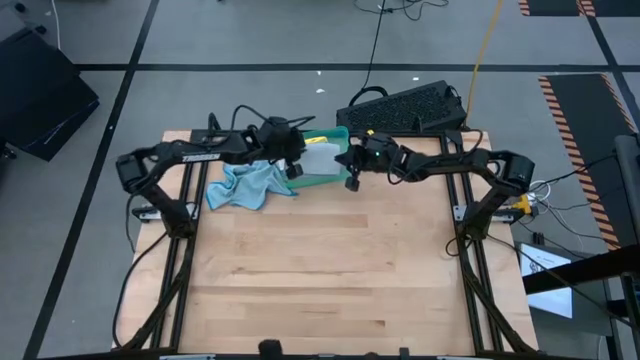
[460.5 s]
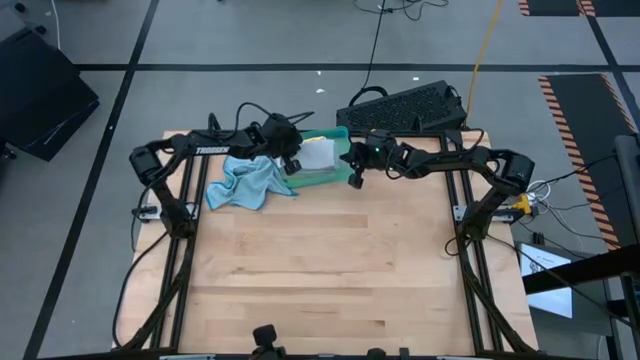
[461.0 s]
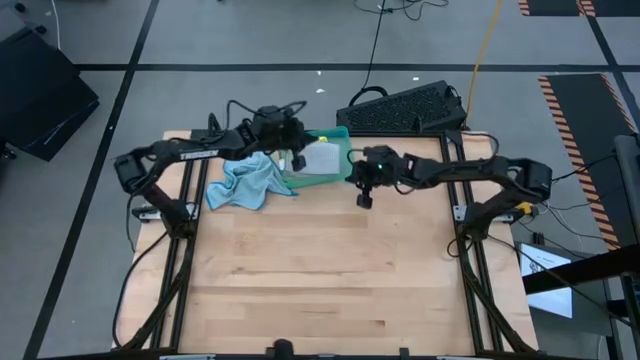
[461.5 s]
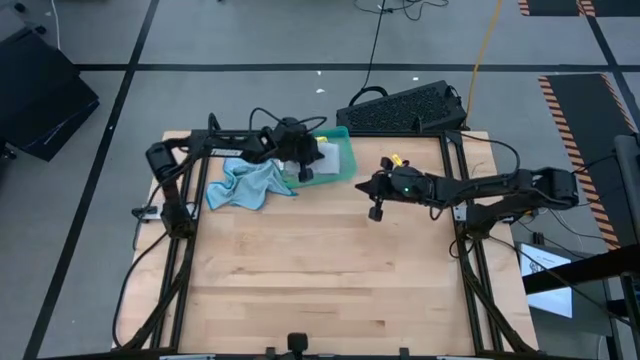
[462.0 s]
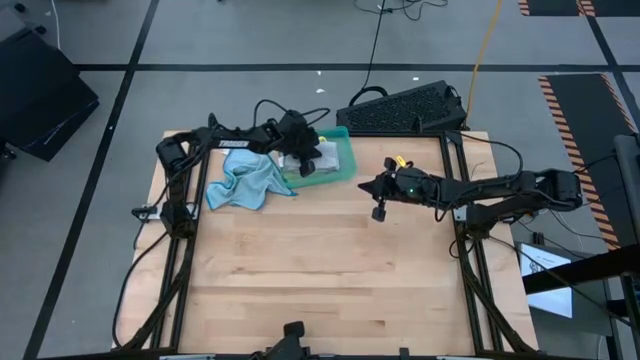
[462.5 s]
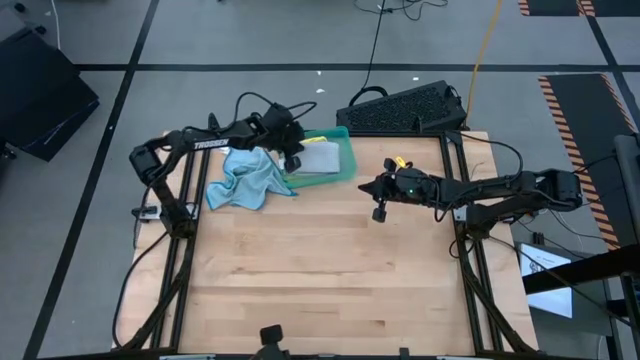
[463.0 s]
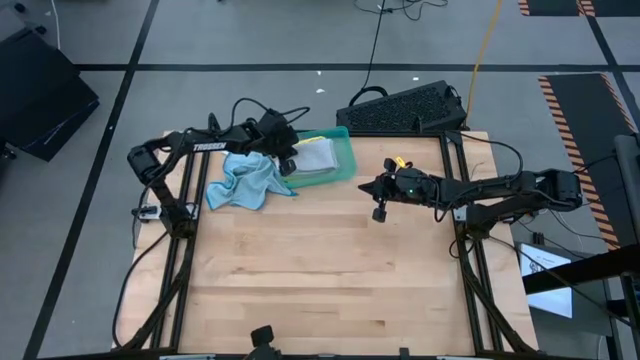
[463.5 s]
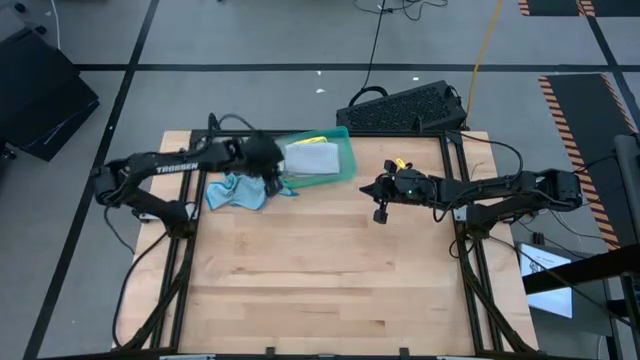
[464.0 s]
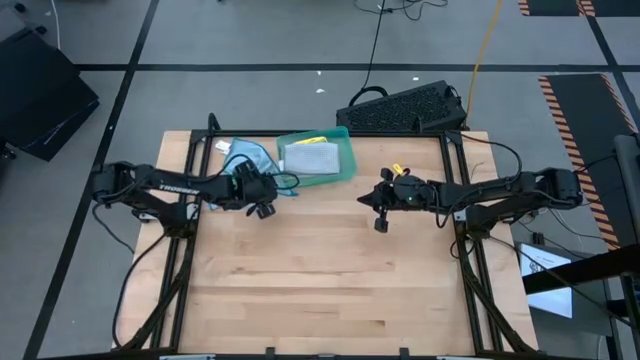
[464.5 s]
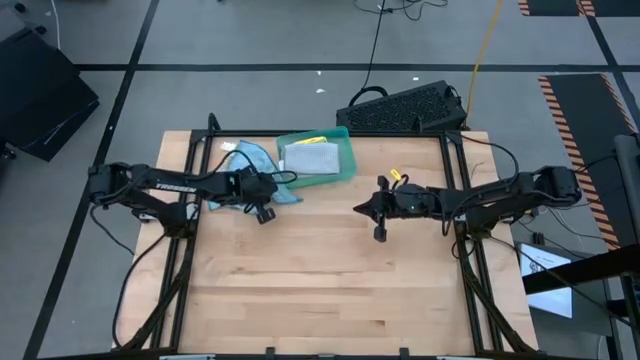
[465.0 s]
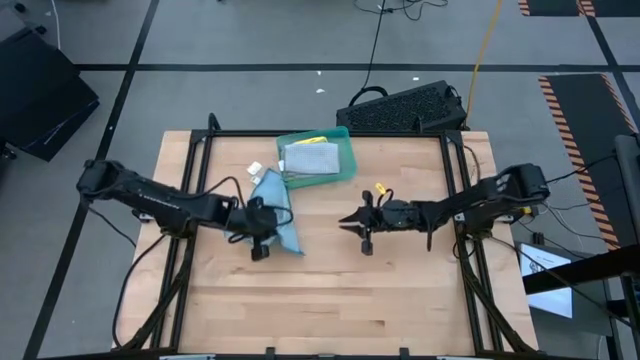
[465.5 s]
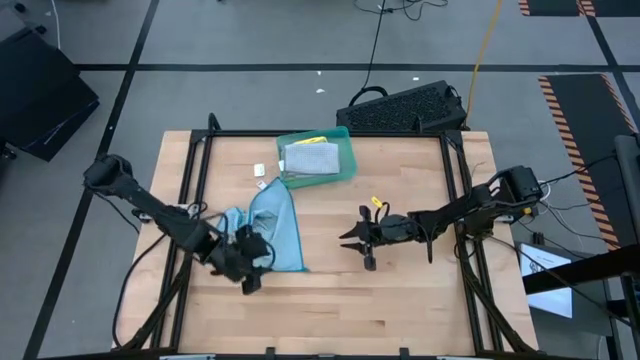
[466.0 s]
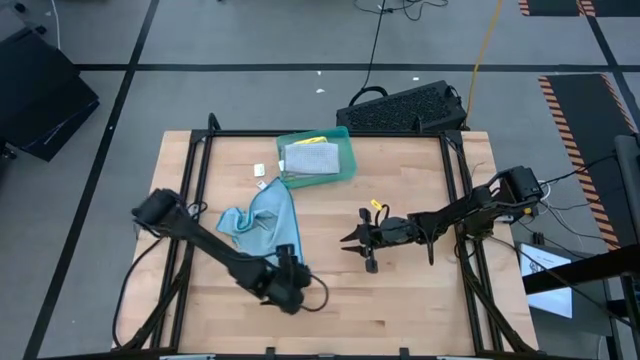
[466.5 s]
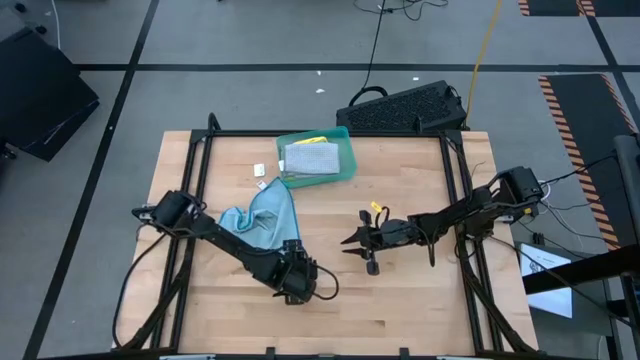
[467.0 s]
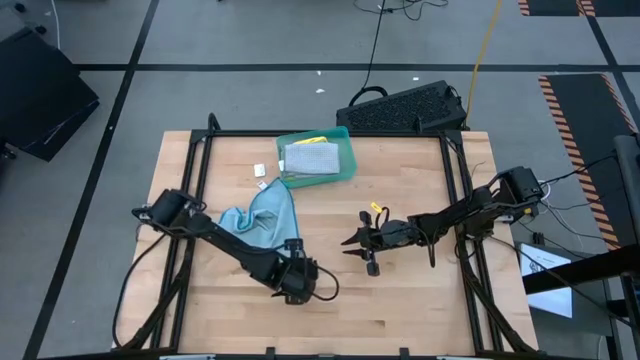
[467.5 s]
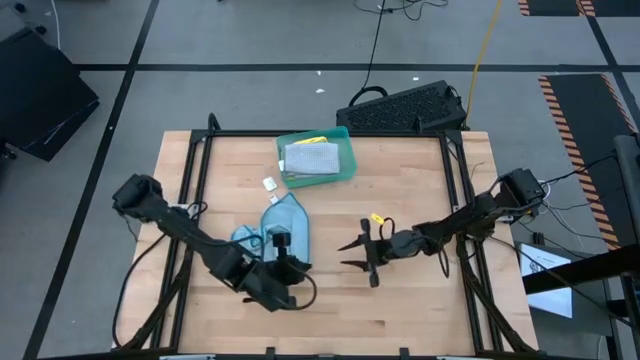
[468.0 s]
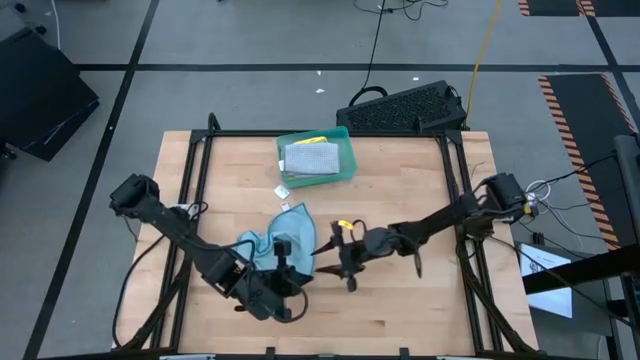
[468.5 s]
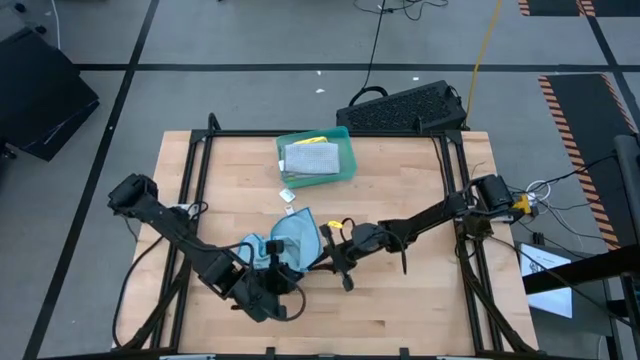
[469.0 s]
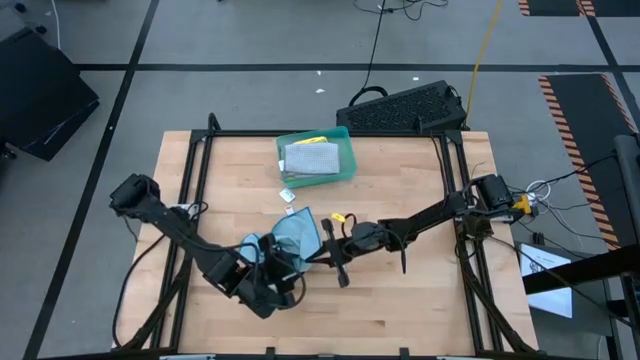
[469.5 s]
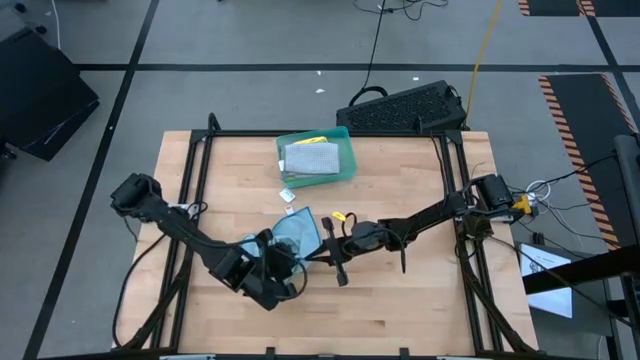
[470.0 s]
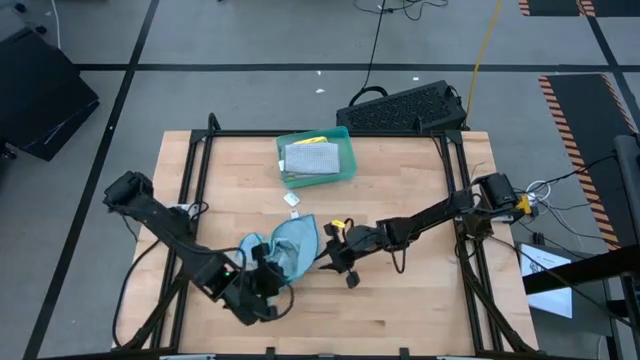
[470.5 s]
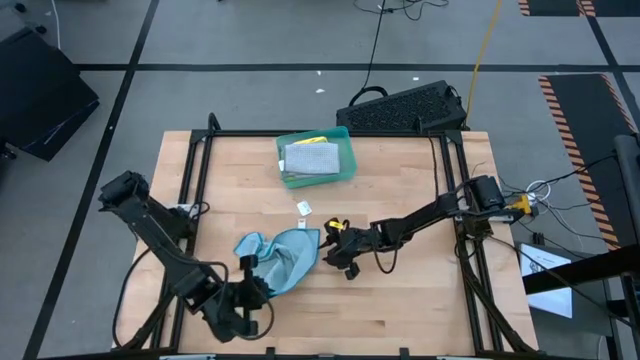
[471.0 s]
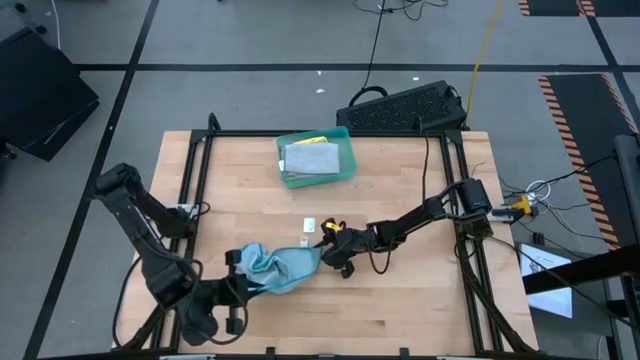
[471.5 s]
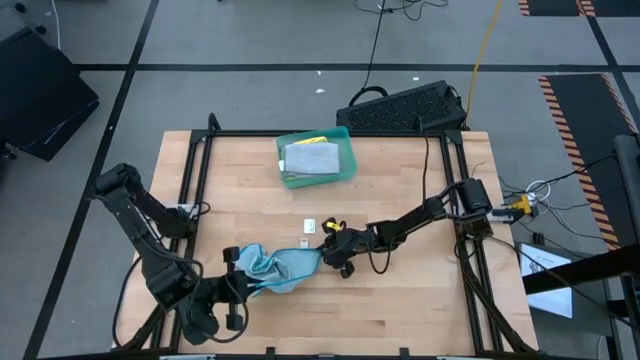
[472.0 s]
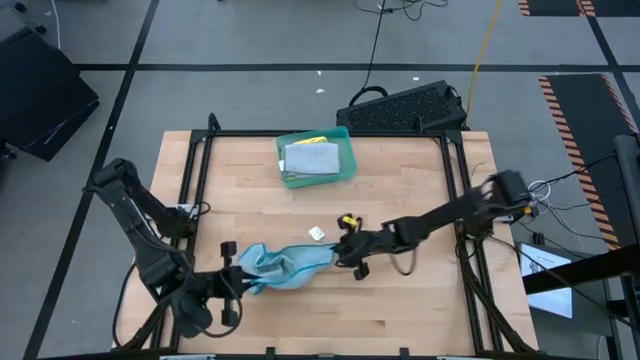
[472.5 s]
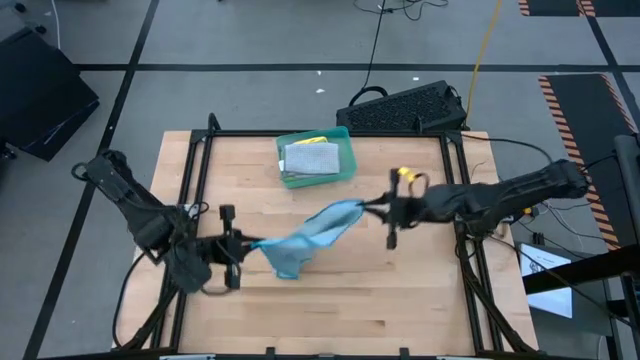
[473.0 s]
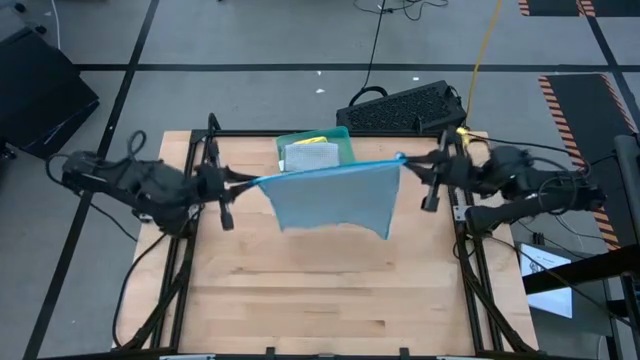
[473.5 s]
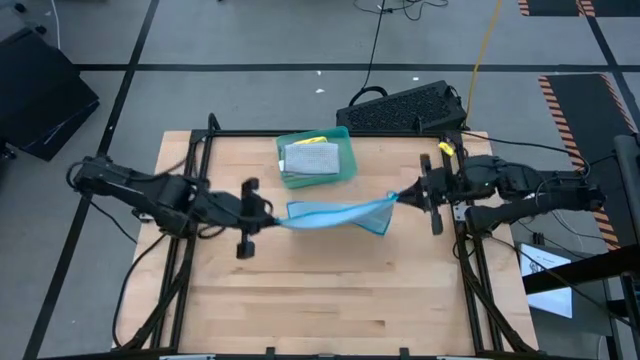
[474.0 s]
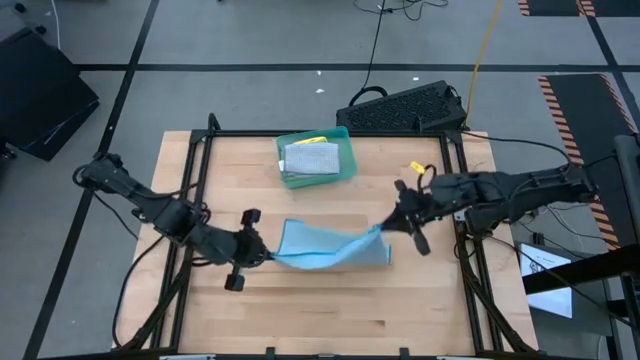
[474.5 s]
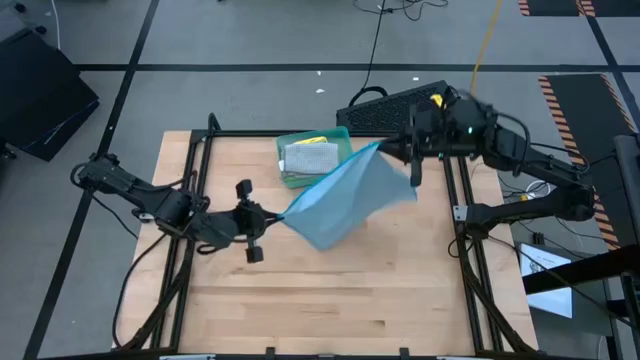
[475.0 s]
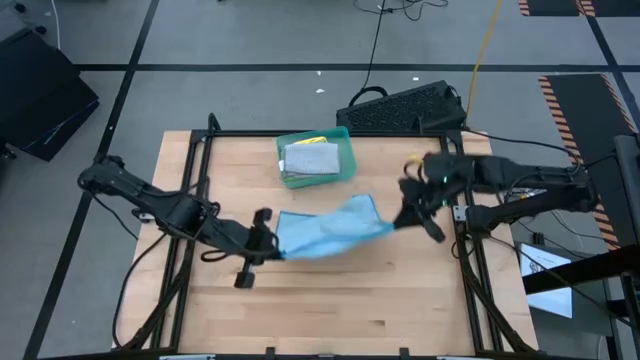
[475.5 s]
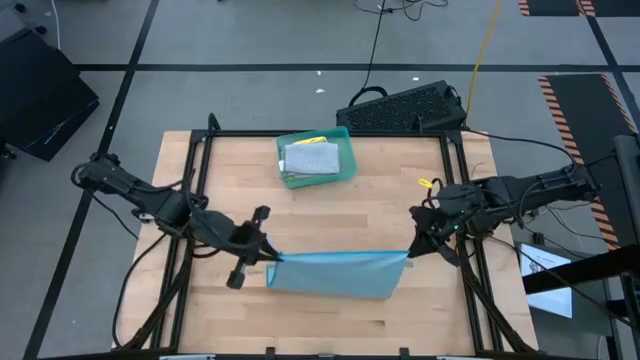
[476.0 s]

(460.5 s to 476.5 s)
Task: Fold microfiber towels
Fold the blue microfiber cloth

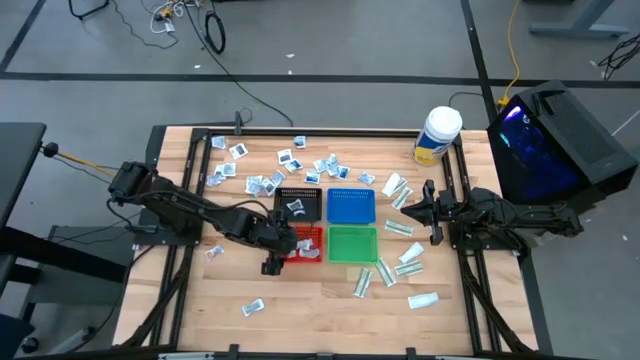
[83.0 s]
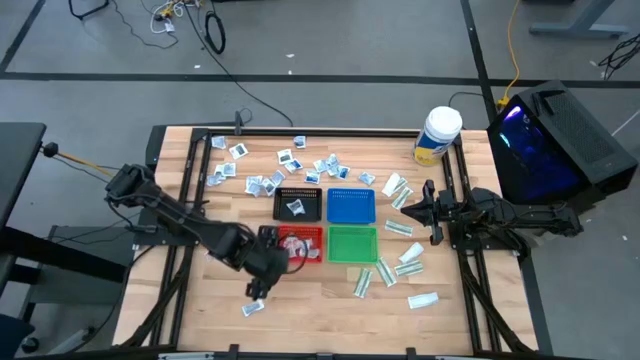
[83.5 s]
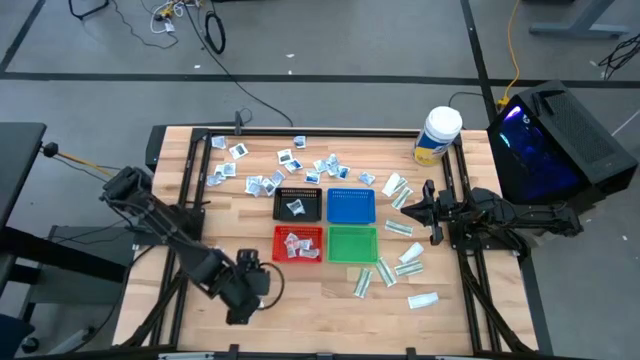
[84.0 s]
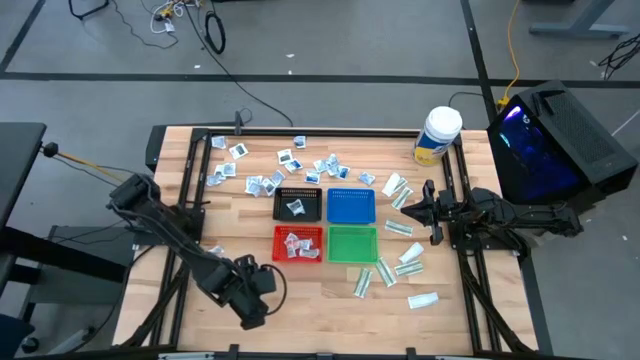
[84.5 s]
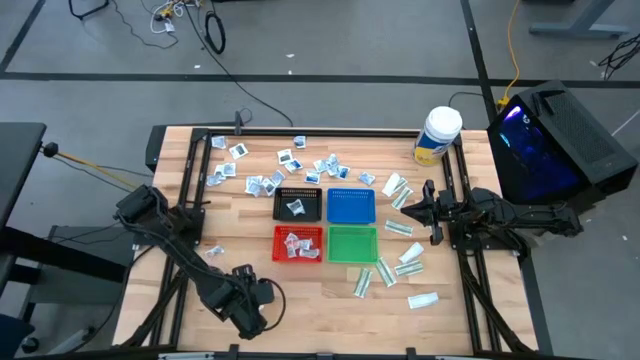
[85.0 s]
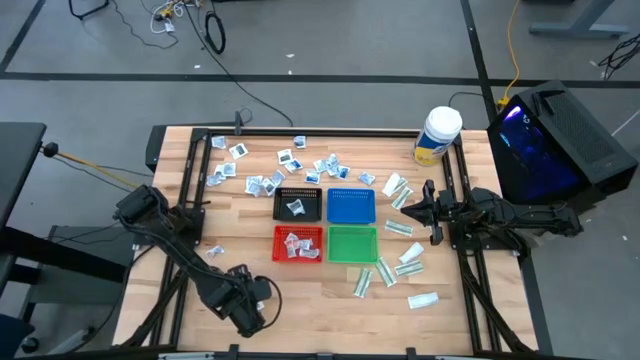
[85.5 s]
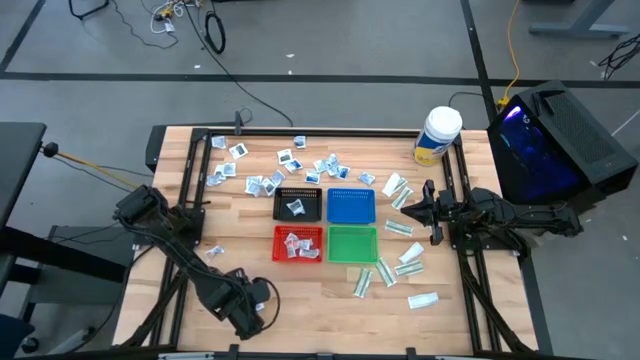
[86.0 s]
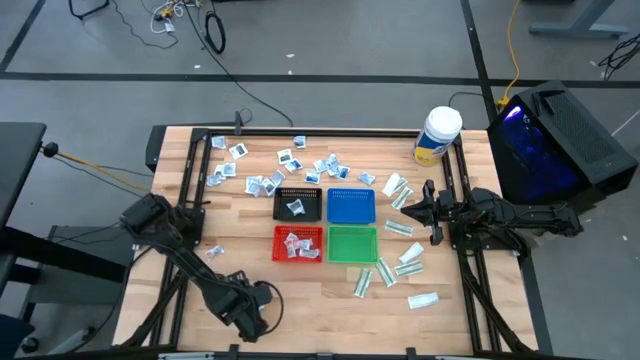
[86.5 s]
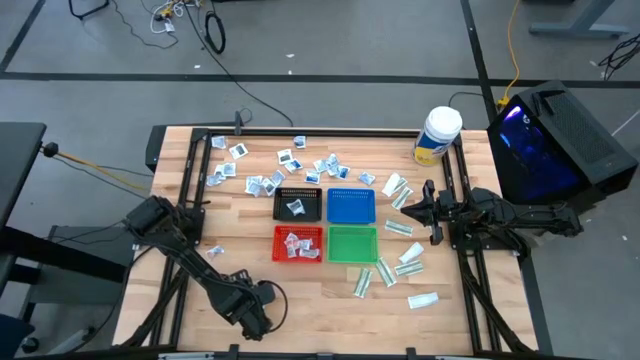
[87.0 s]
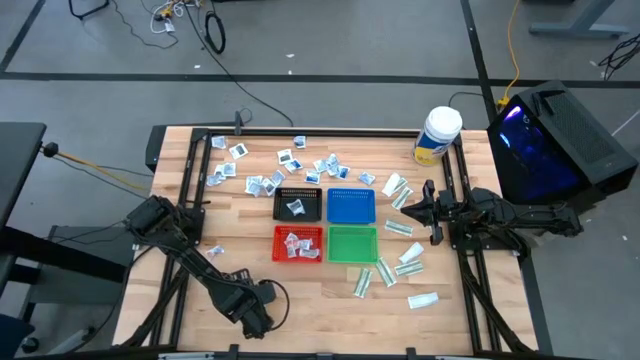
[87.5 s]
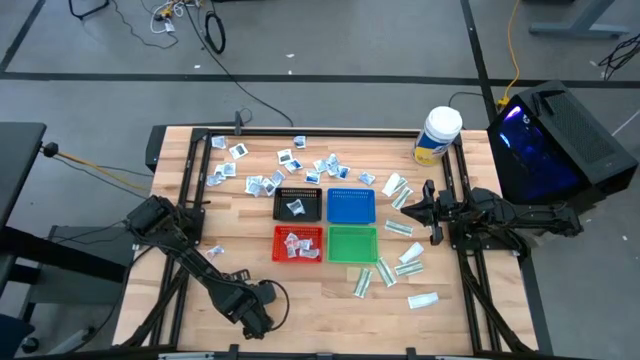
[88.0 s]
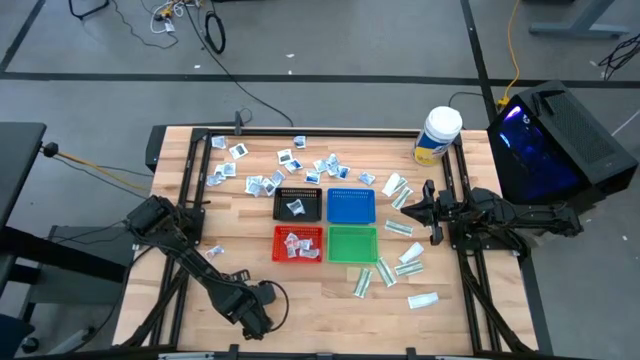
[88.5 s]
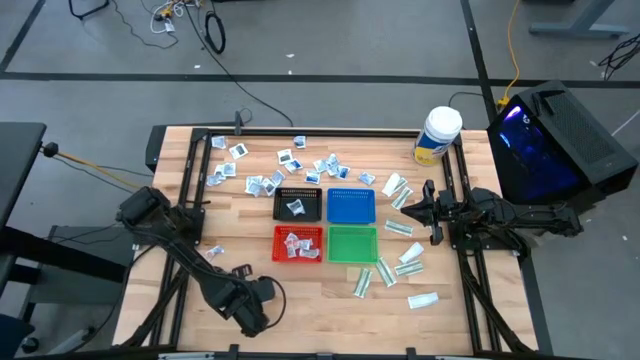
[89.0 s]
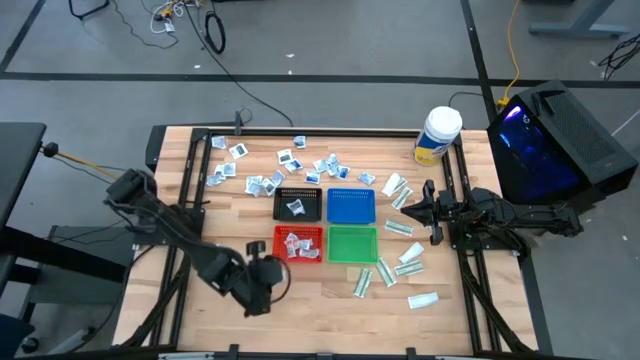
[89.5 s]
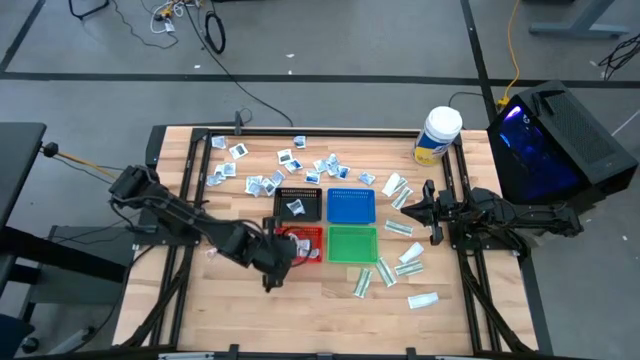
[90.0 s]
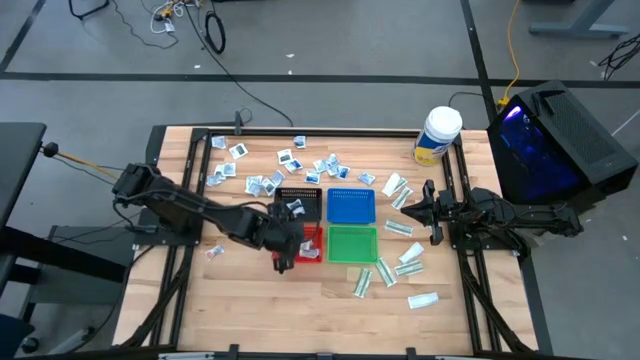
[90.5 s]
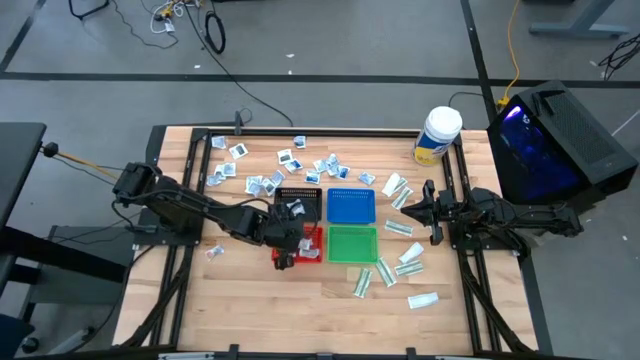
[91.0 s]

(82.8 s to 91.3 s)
Task: Pick & Place First Aid Supplies
Put the orange ointment pack into the orange bin
